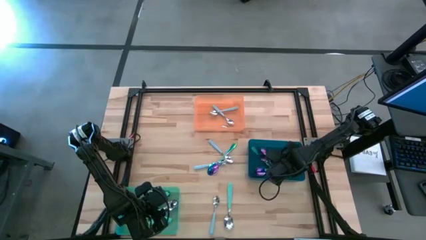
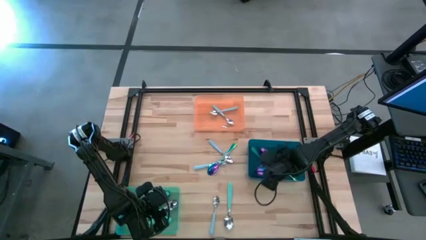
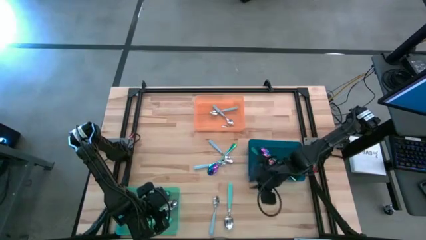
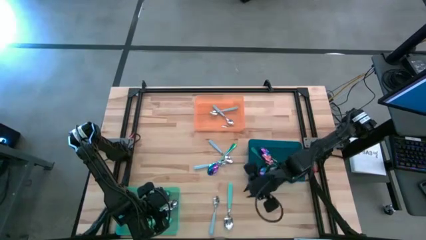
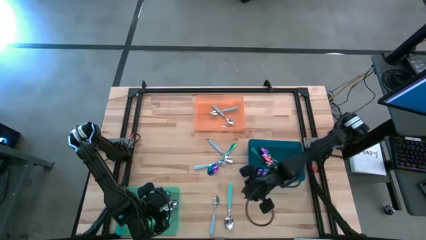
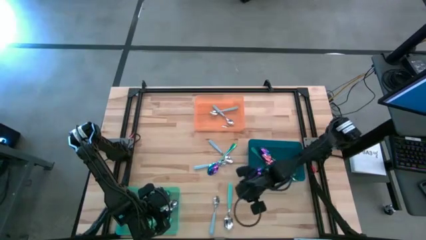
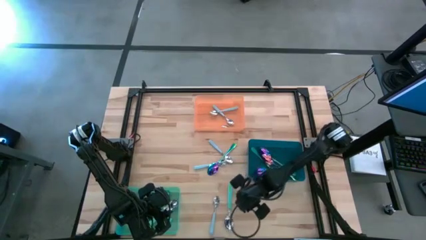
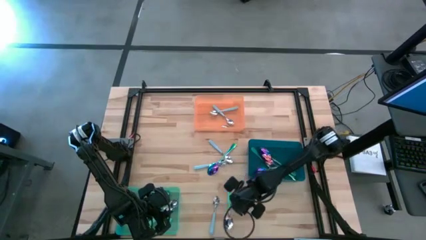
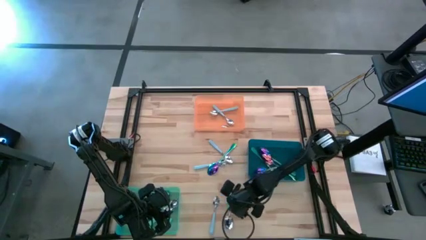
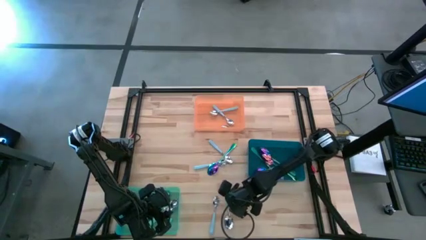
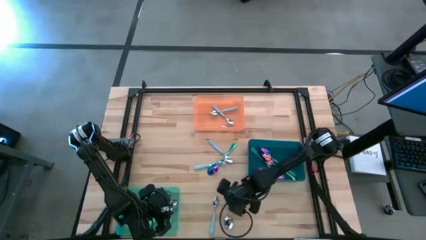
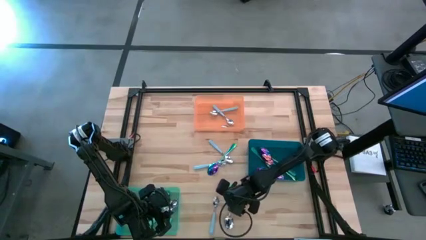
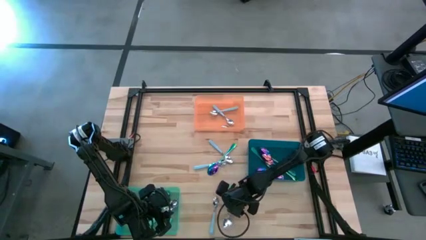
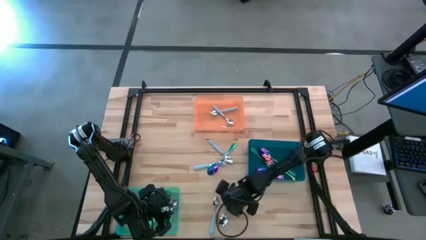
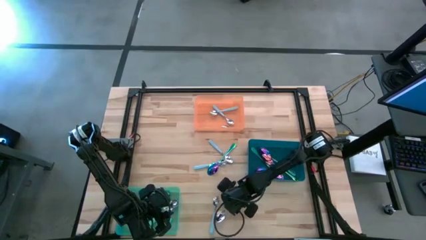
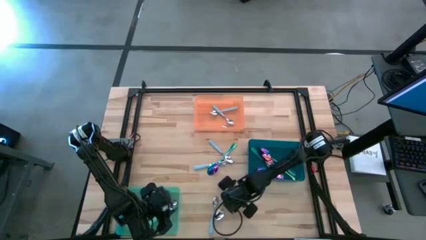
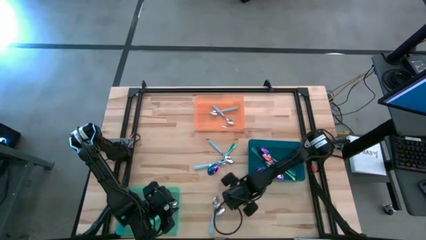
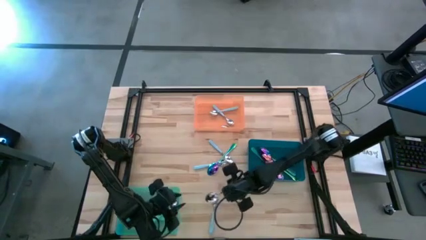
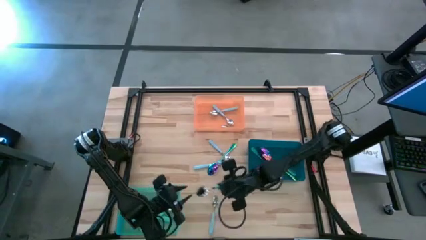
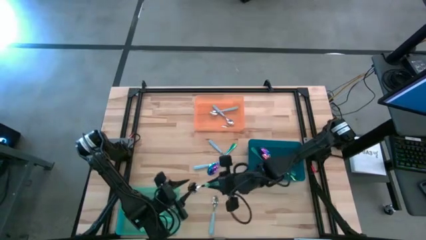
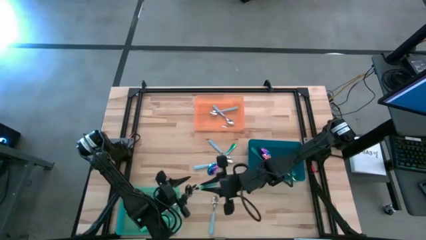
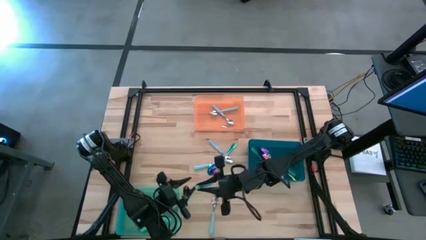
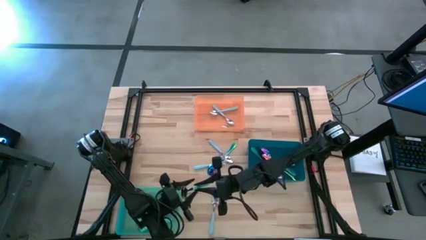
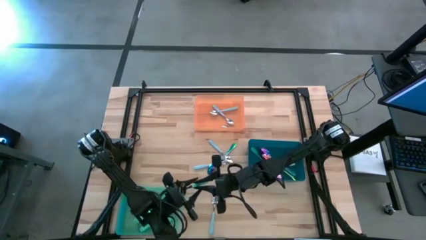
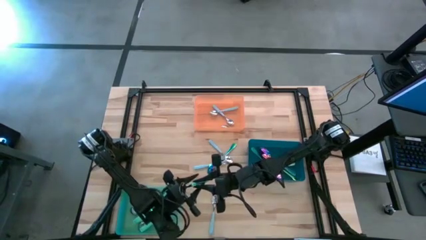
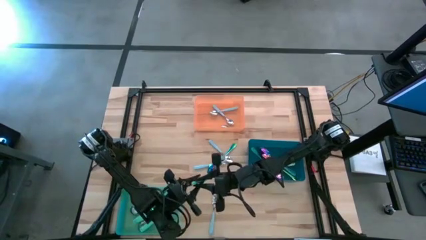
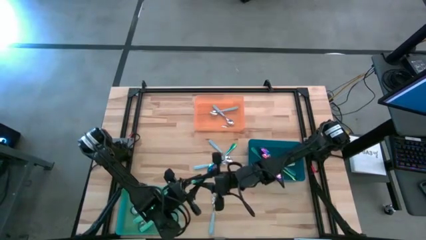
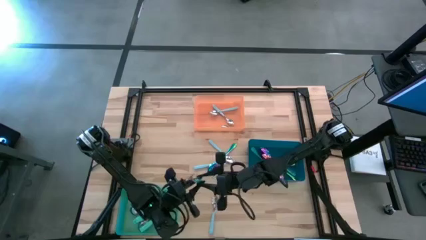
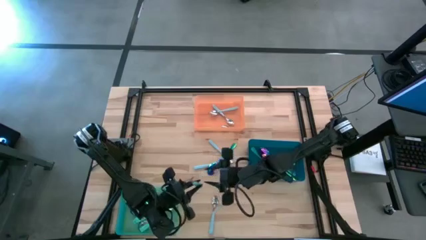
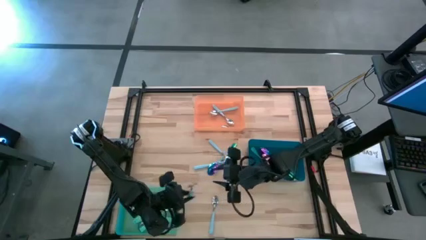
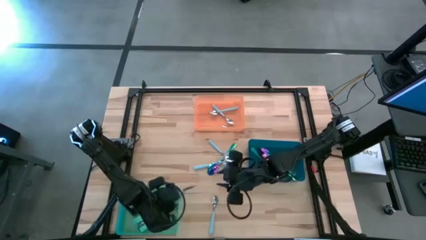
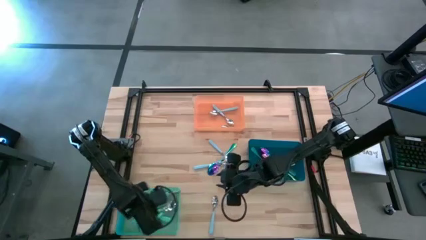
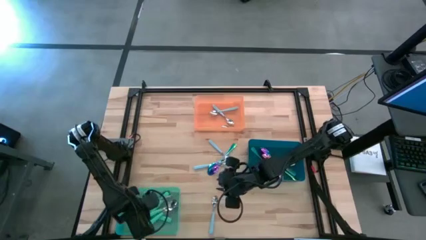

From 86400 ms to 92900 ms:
Task: Sort silverware by color (type)
Put the green spoon into the green bin

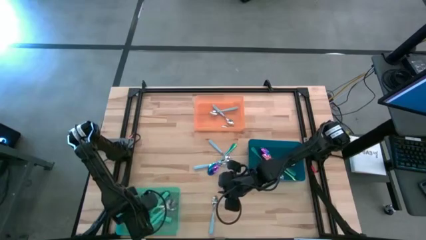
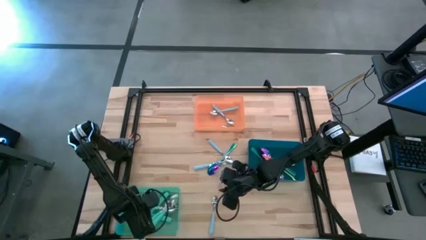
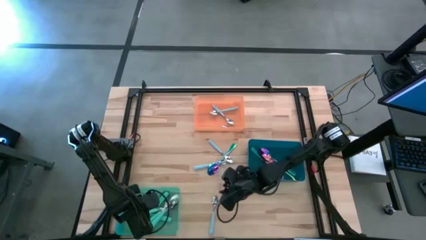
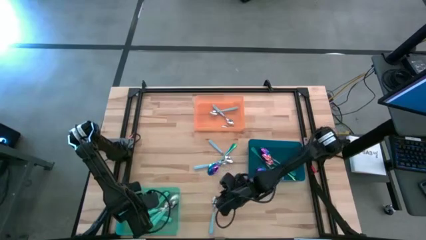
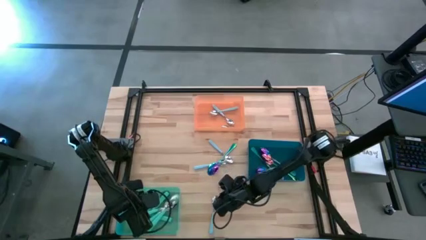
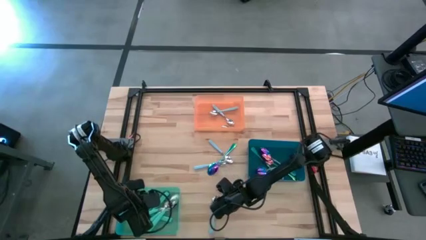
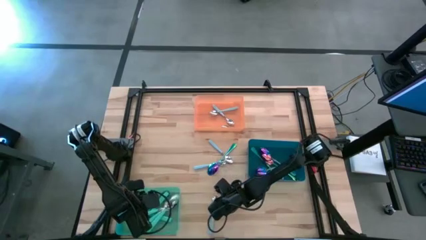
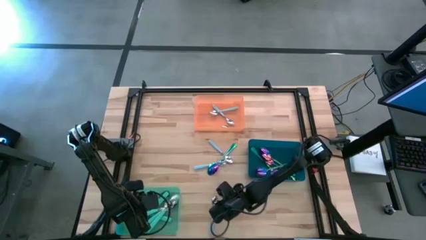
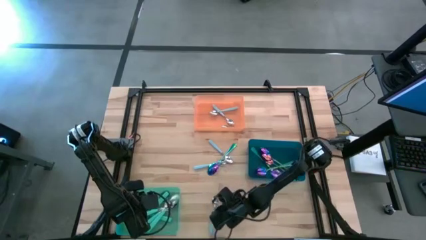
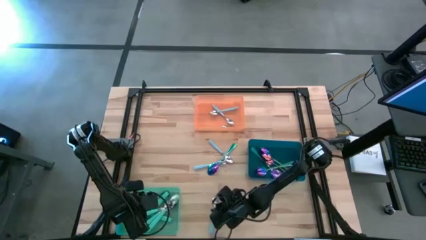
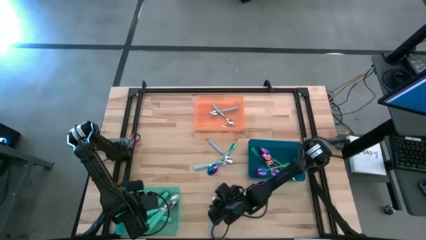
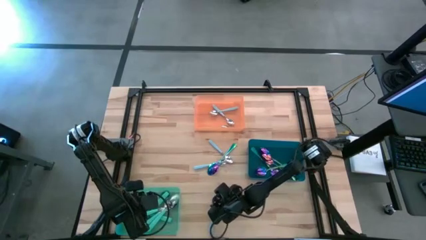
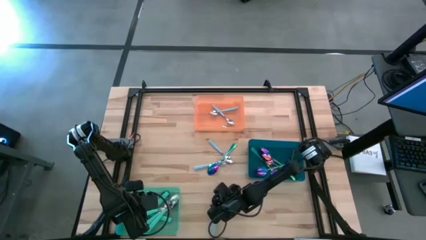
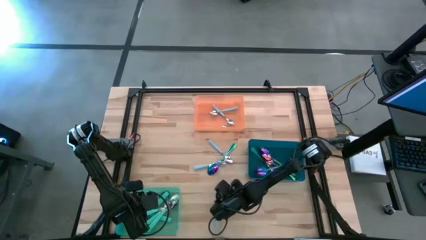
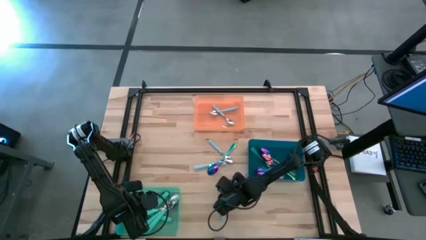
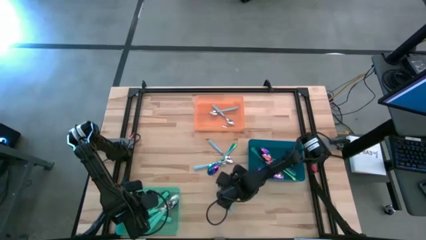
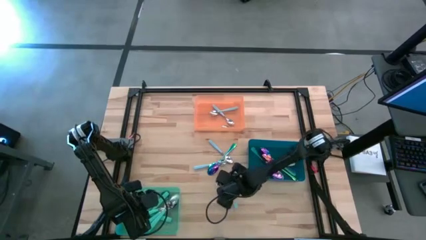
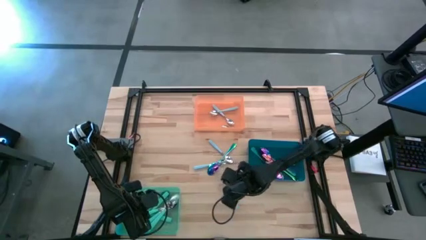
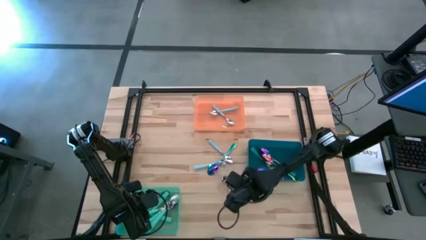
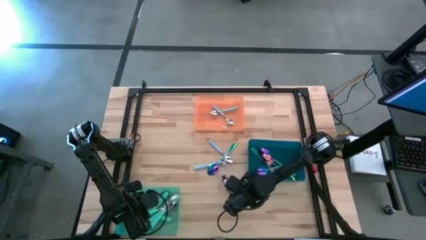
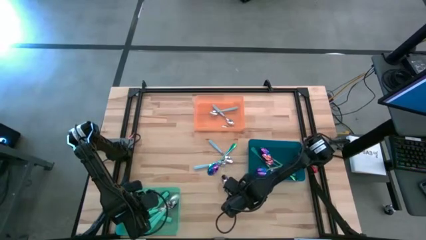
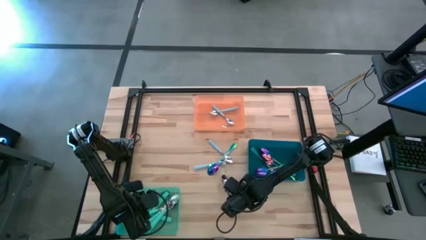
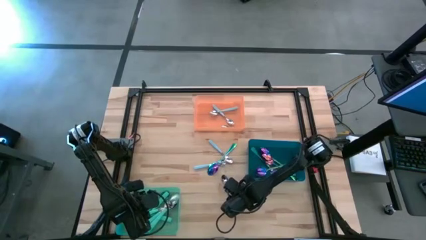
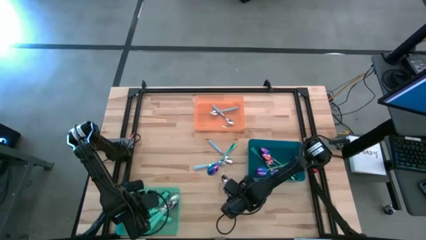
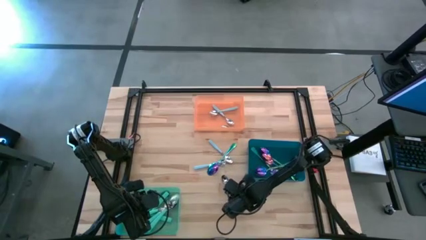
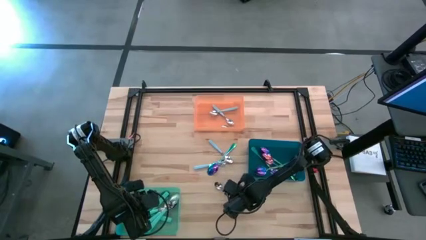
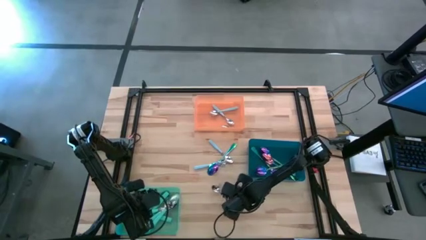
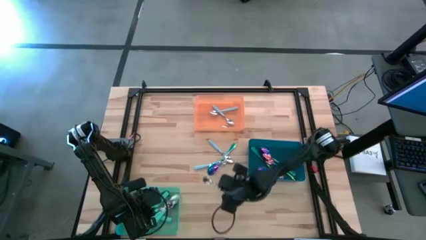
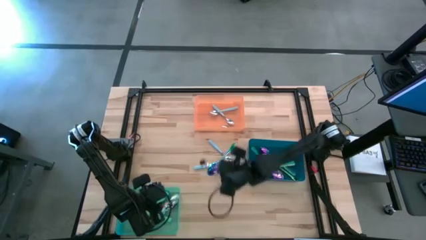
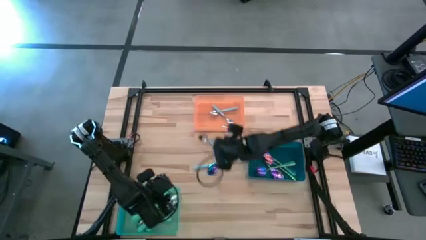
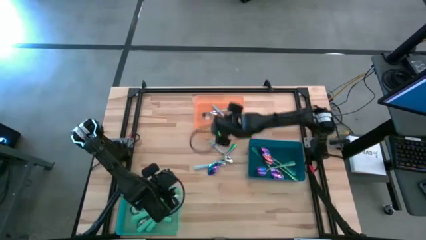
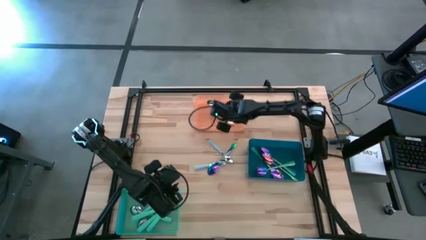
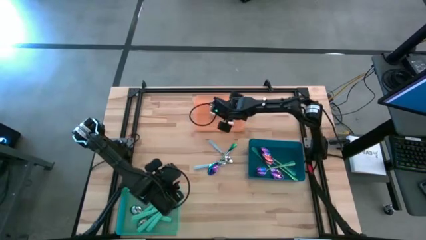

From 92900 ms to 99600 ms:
Put the blue spoon into the orange bin
